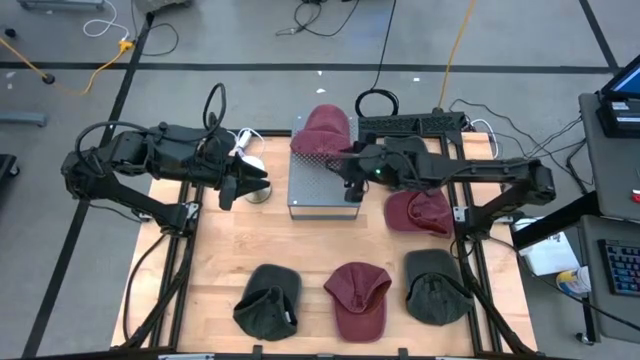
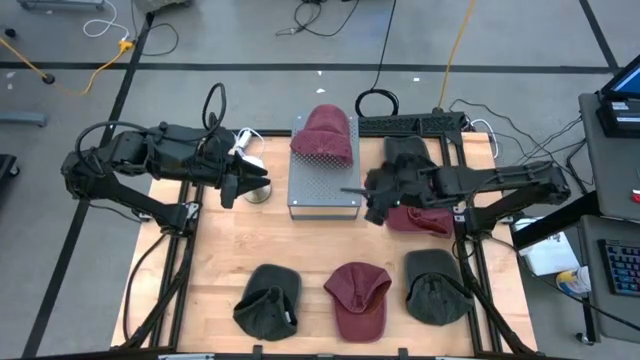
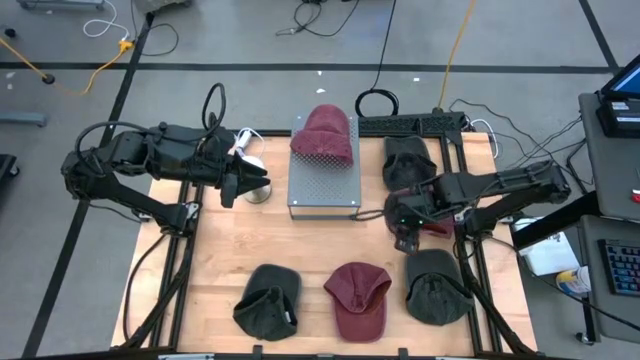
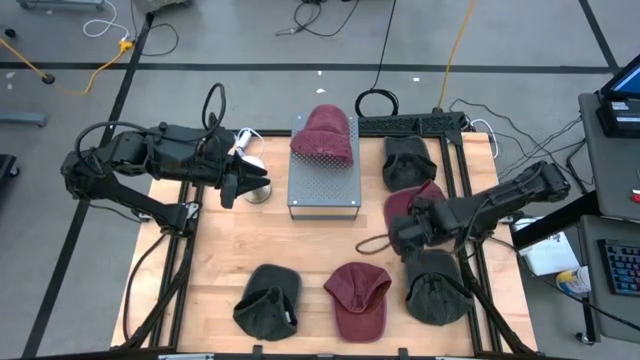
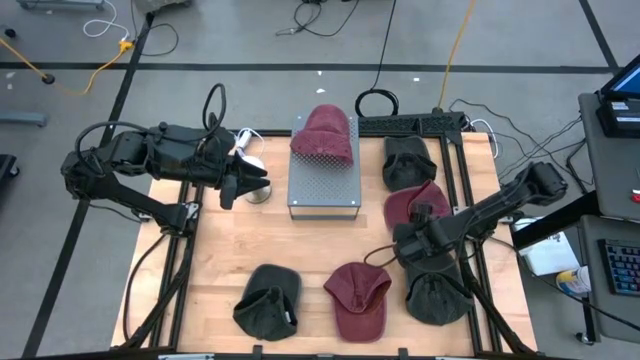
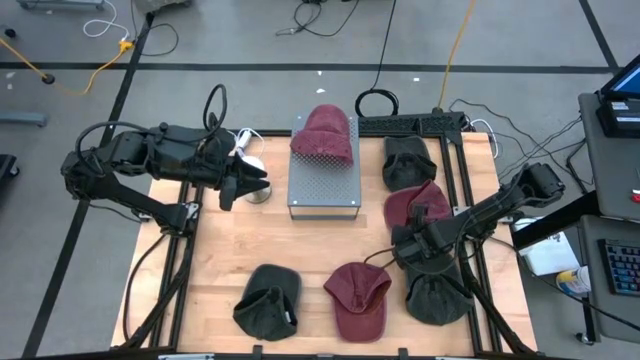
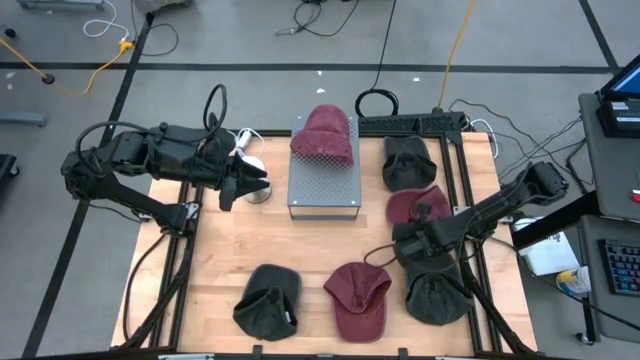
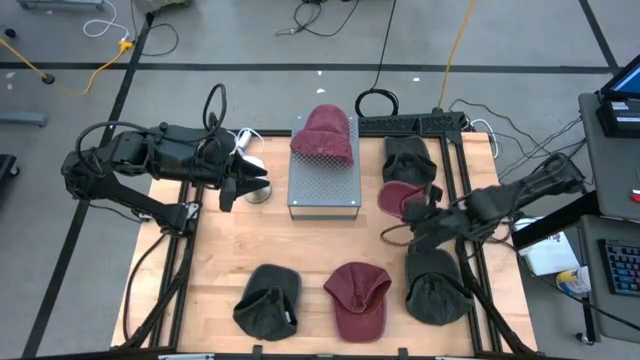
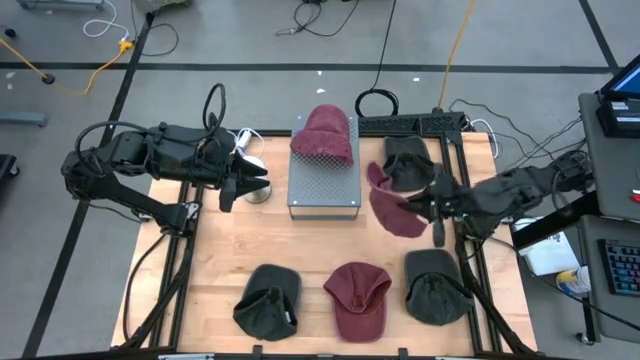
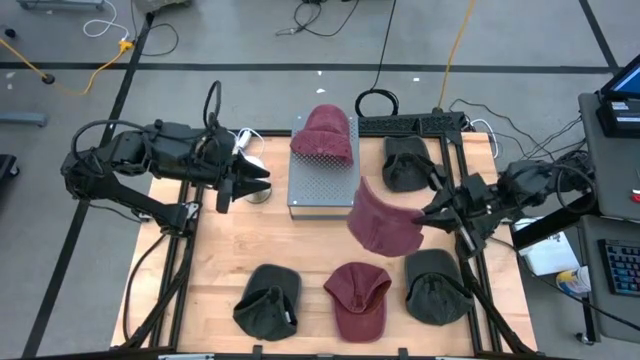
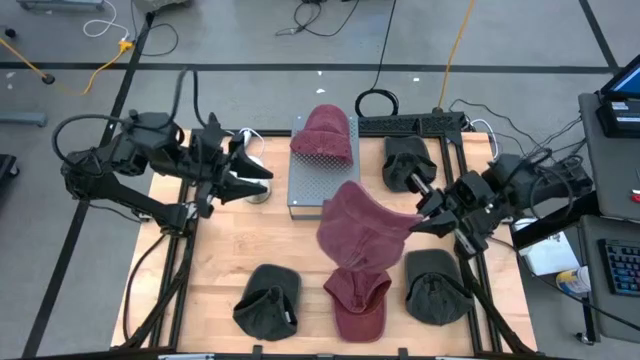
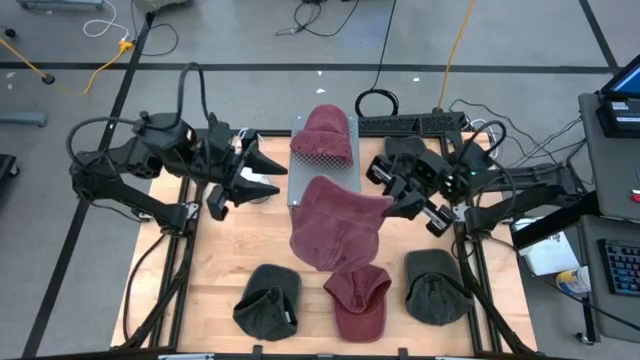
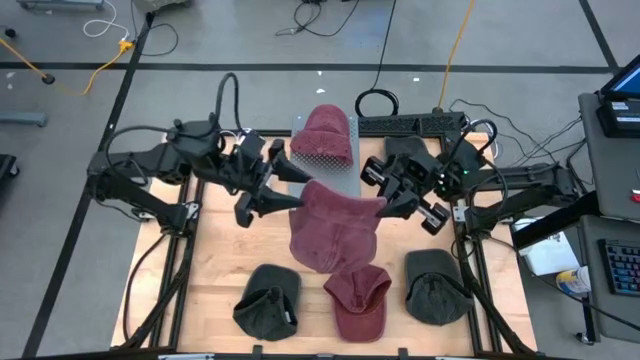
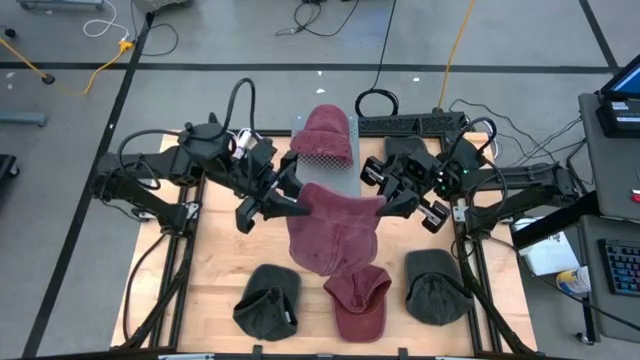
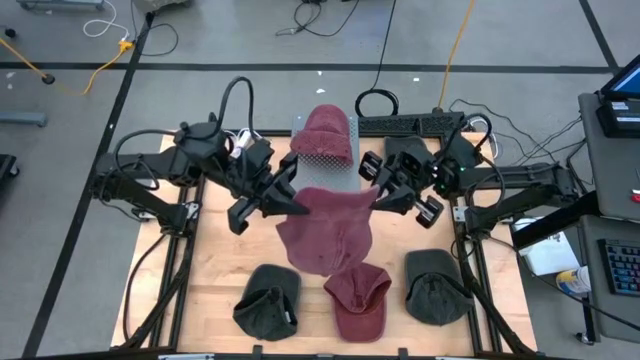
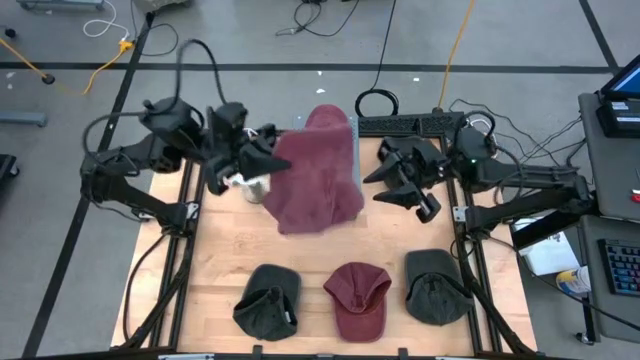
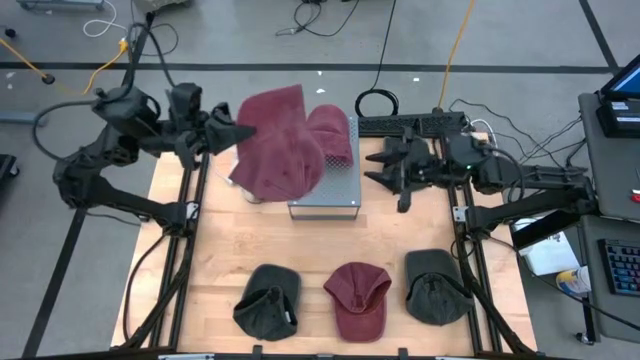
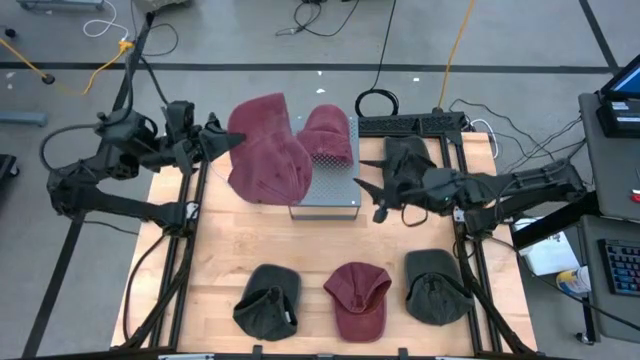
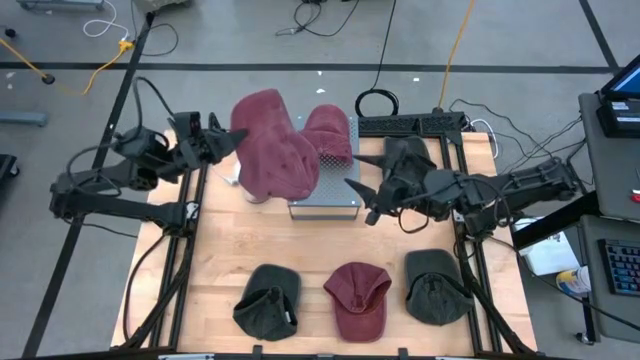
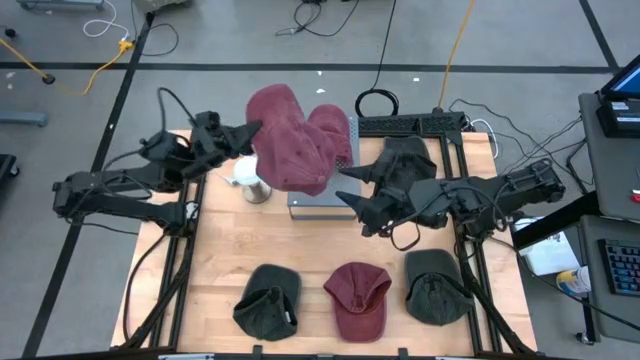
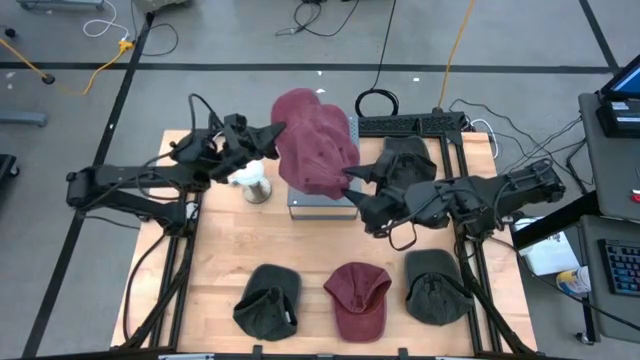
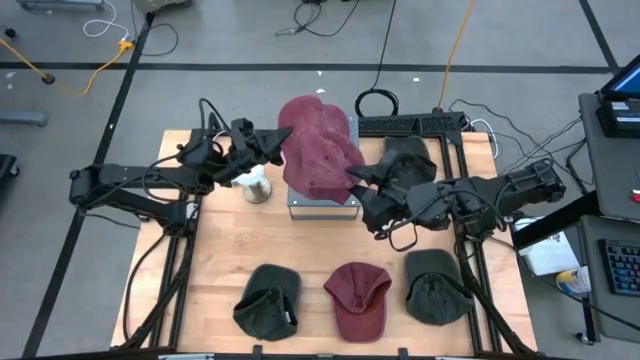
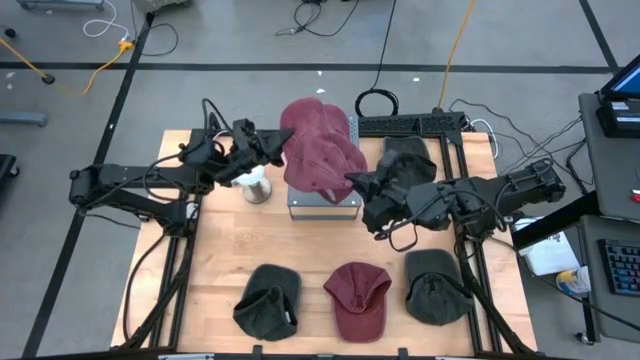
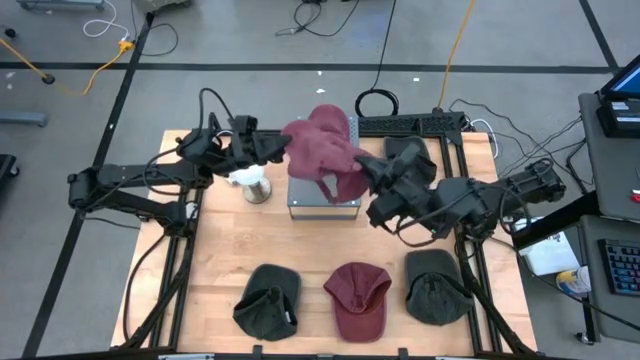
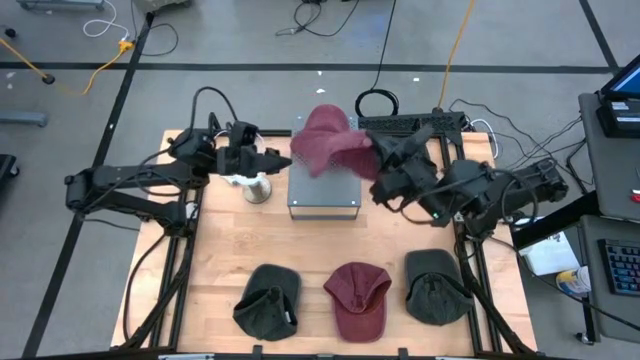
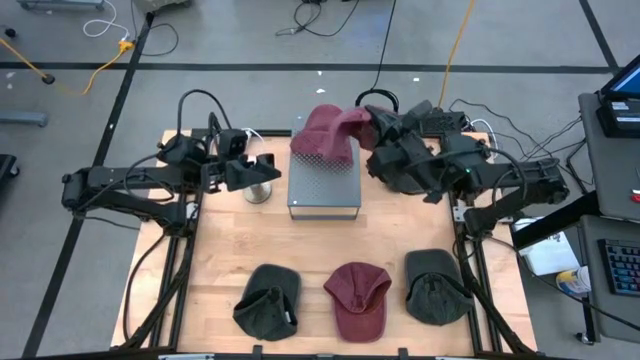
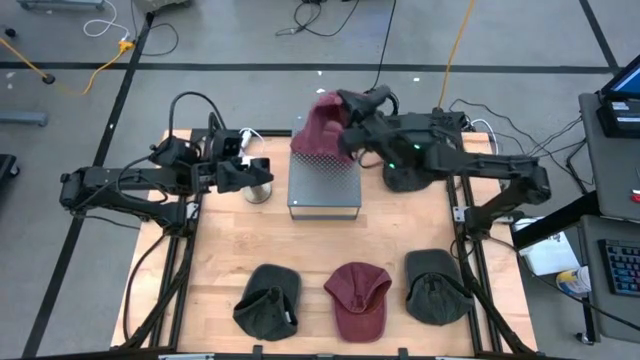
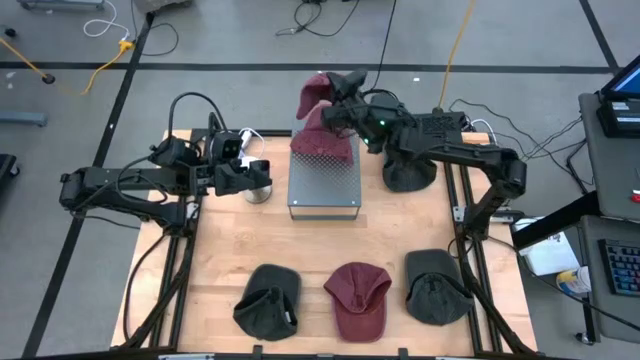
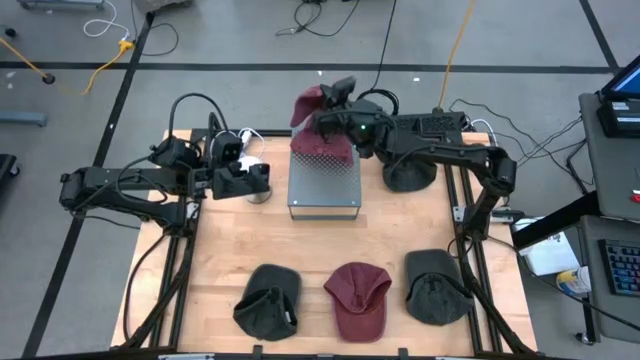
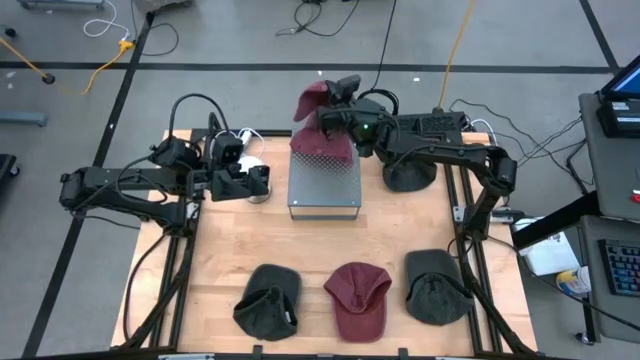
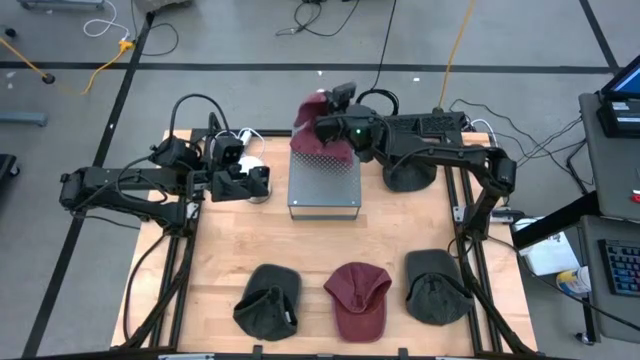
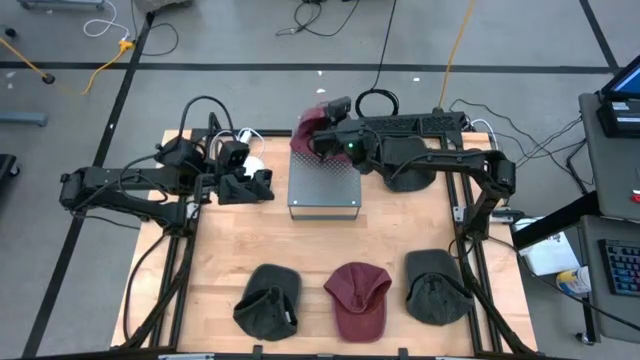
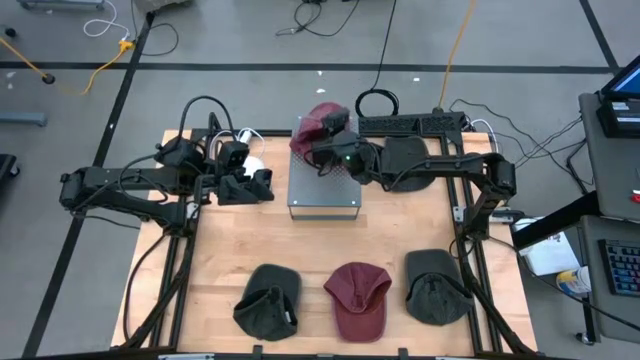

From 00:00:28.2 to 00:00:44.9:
Task: Pick & Place hat
Stack the top red cap on top of the red cap on the shelf

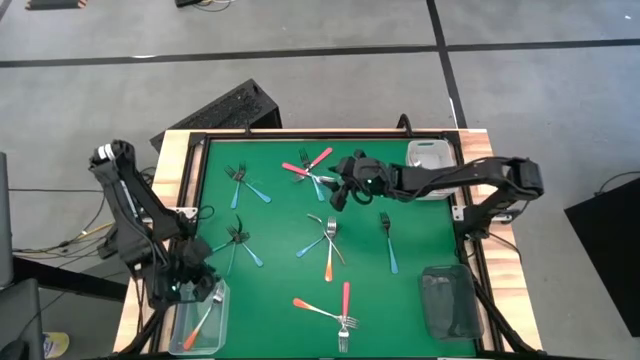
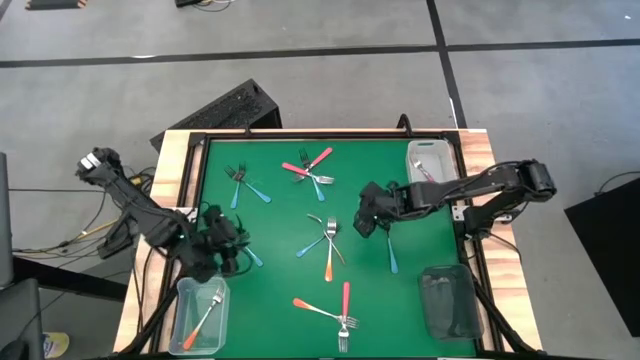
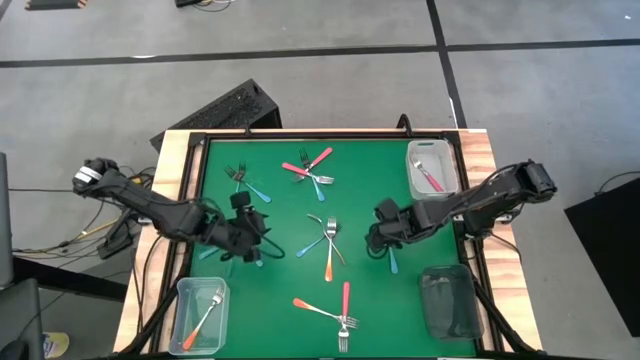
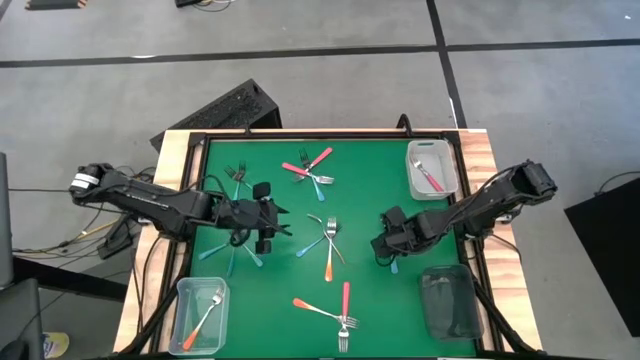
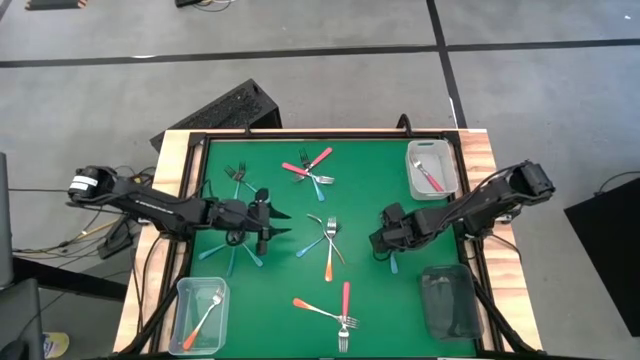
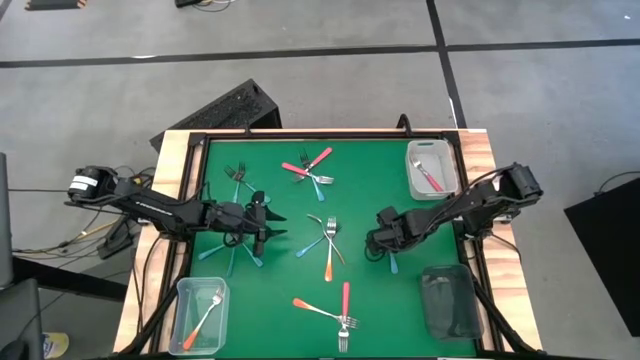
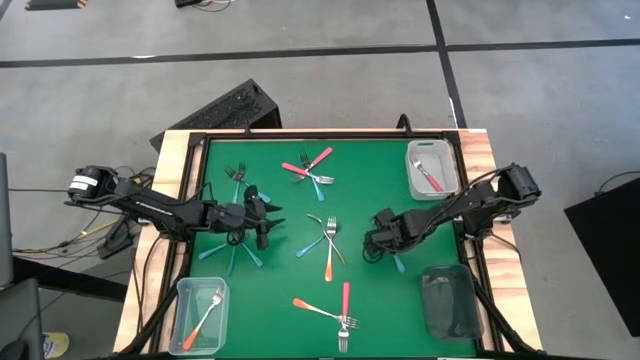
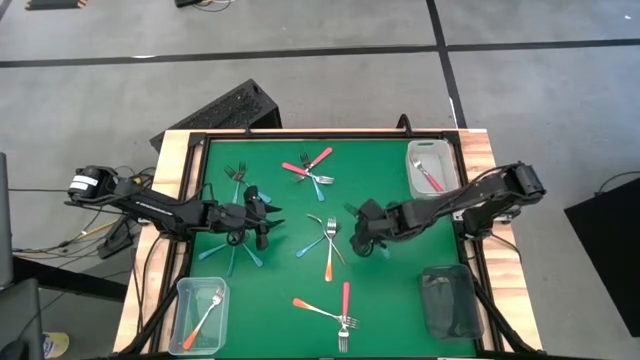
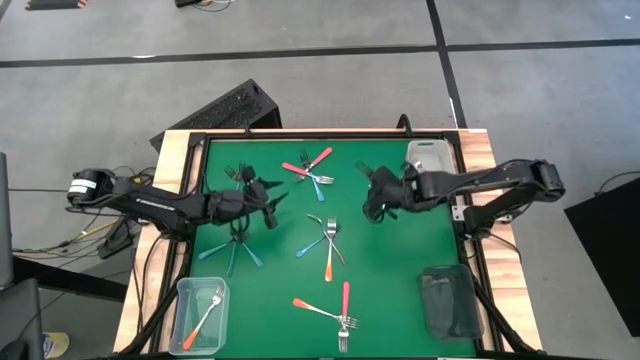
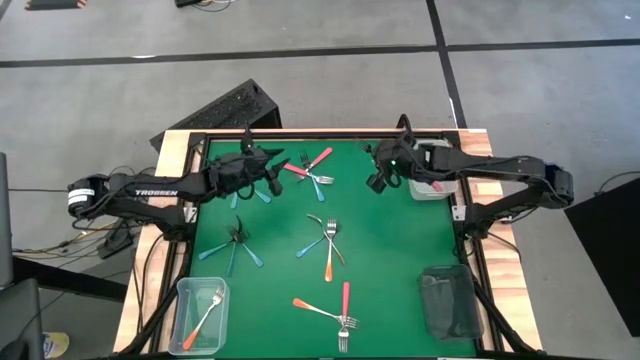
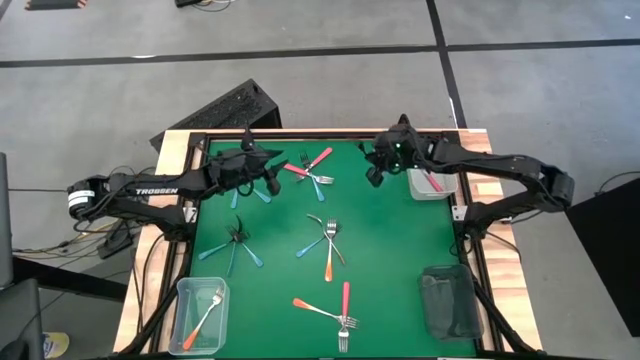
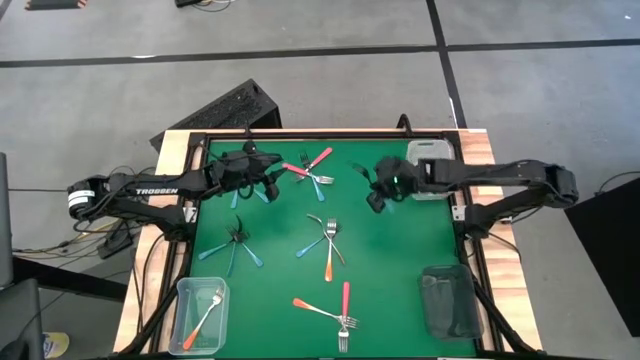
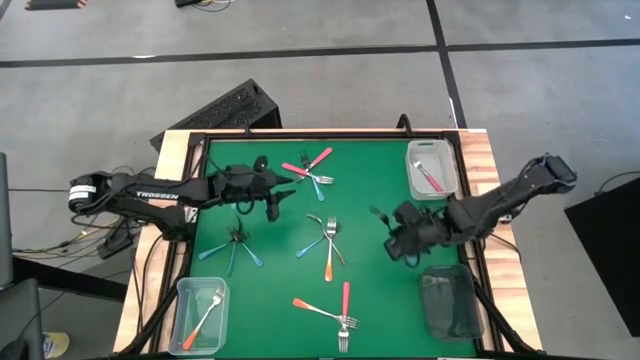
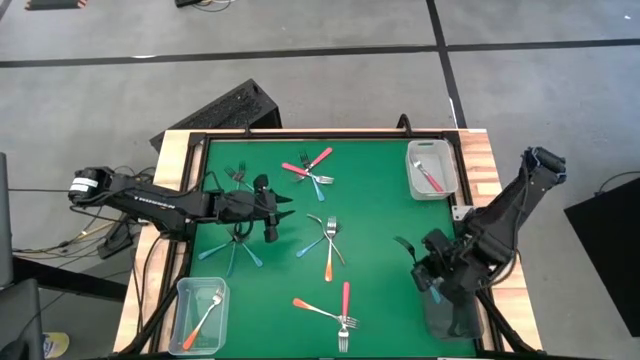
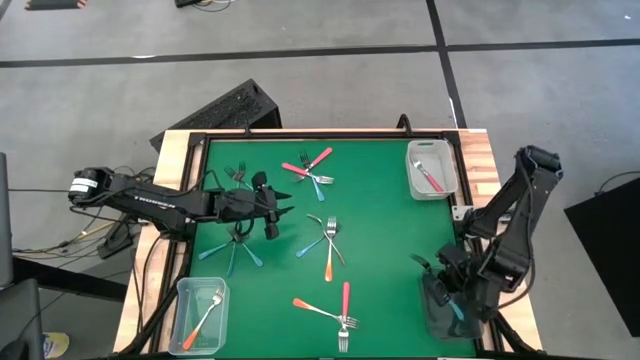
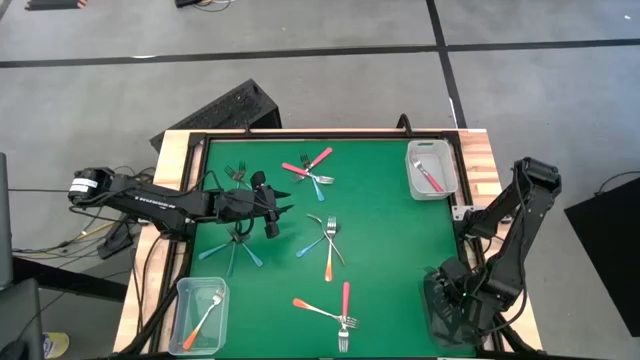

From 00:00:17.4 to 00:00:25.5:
Task: Sort silverware by color (type)
Put the blue fork into the black bin
